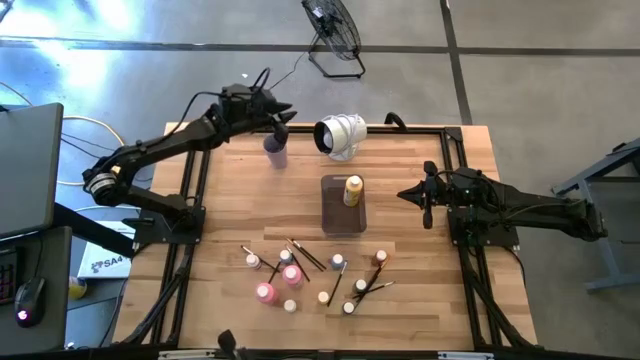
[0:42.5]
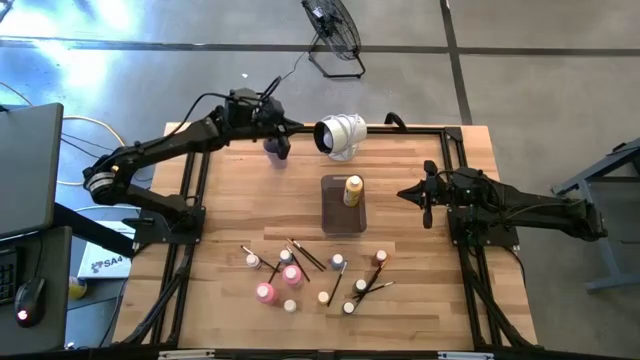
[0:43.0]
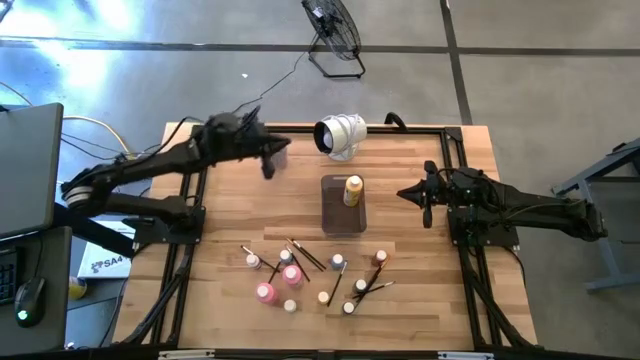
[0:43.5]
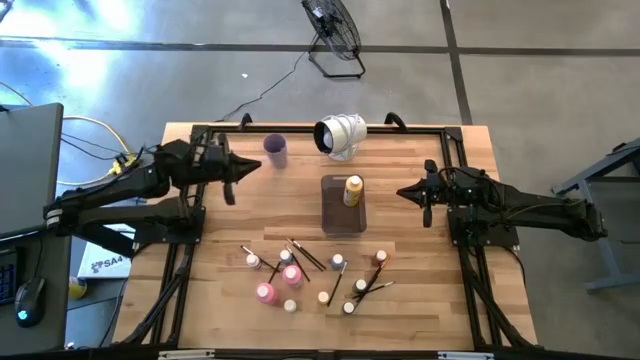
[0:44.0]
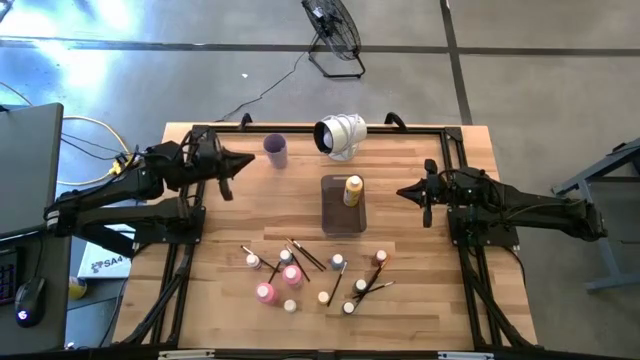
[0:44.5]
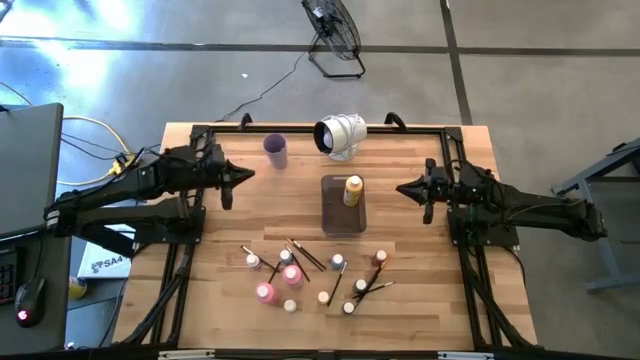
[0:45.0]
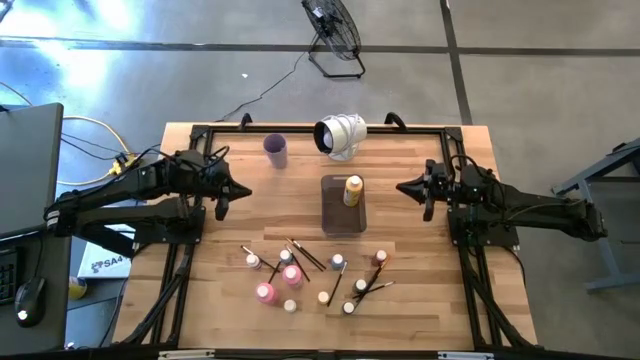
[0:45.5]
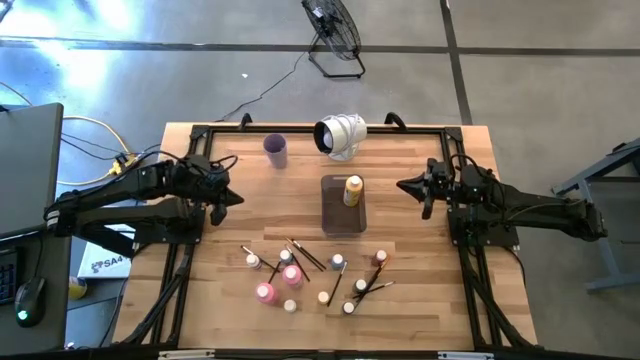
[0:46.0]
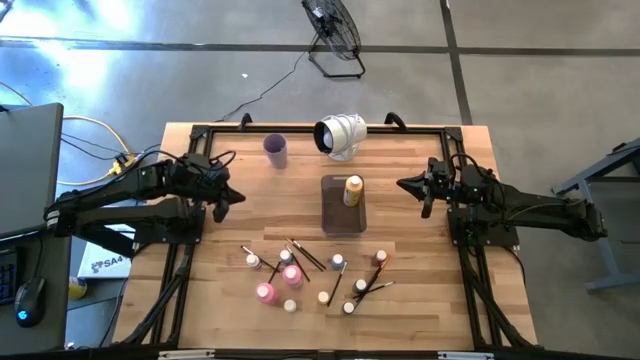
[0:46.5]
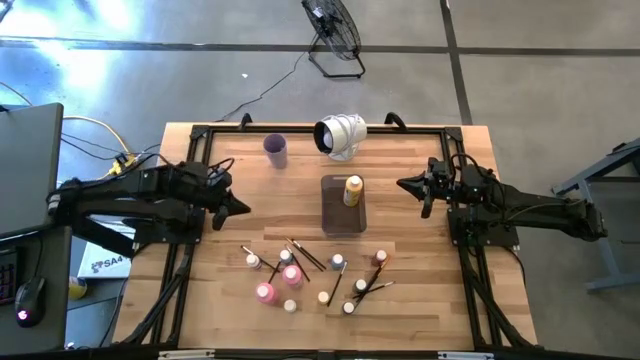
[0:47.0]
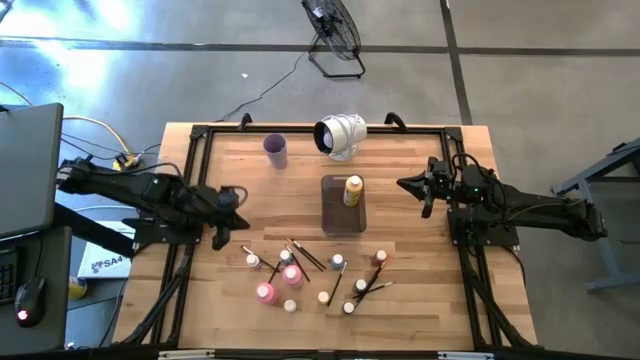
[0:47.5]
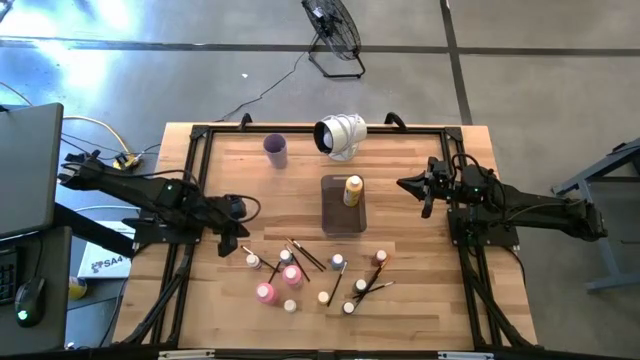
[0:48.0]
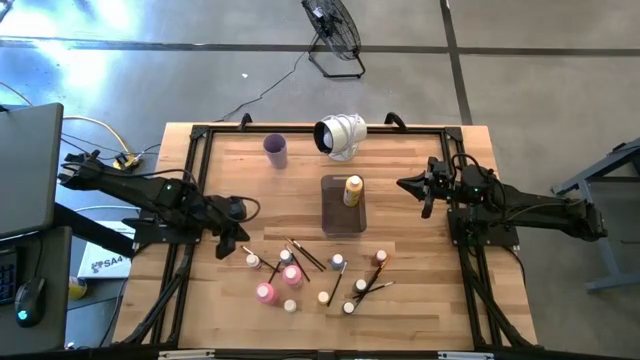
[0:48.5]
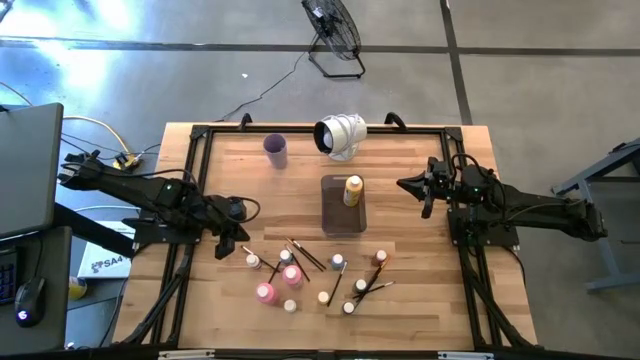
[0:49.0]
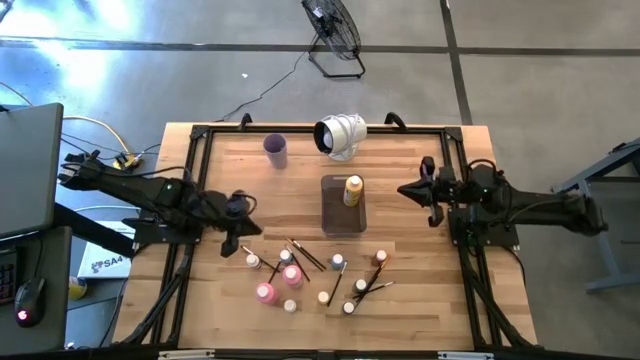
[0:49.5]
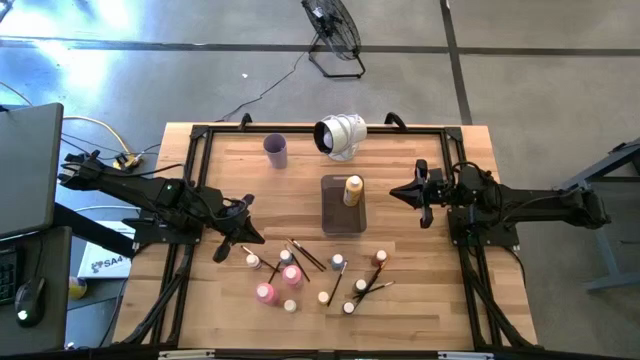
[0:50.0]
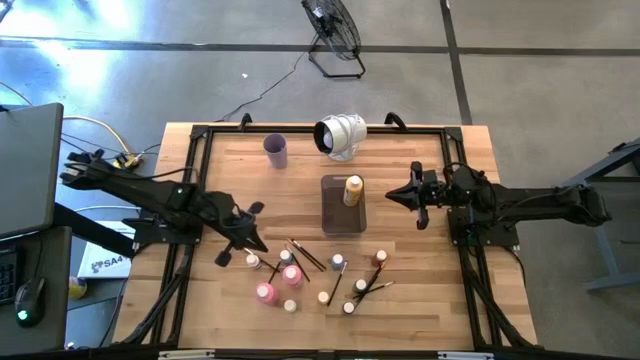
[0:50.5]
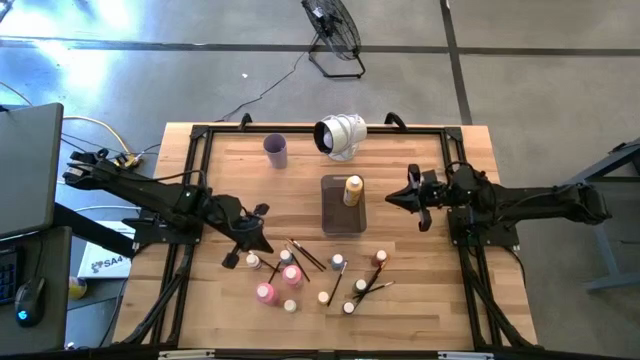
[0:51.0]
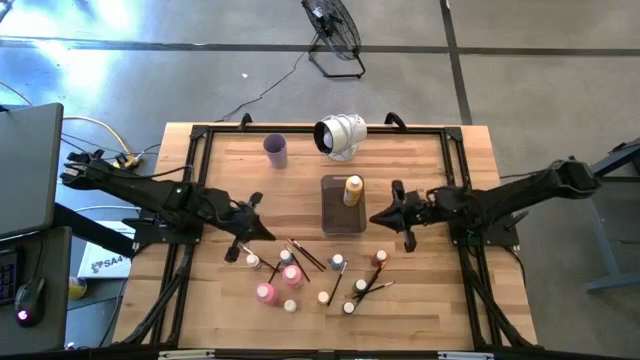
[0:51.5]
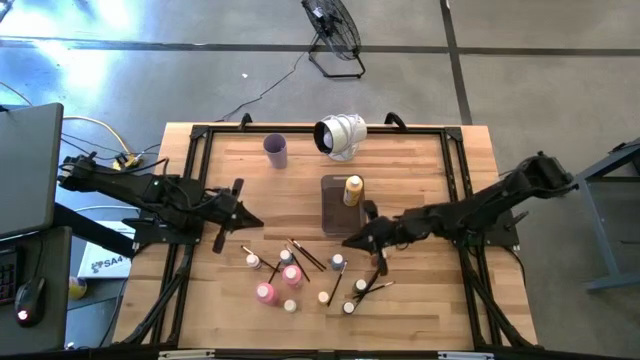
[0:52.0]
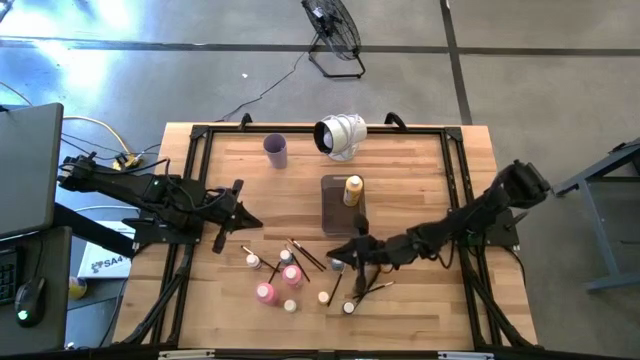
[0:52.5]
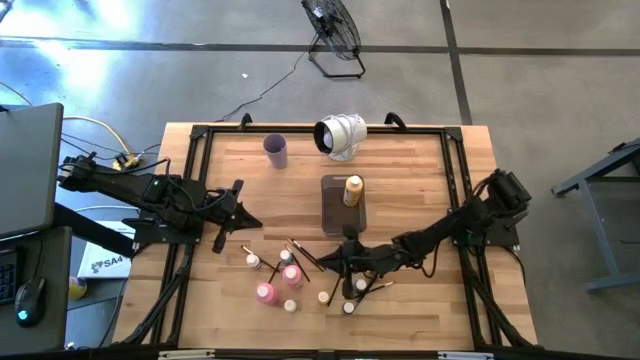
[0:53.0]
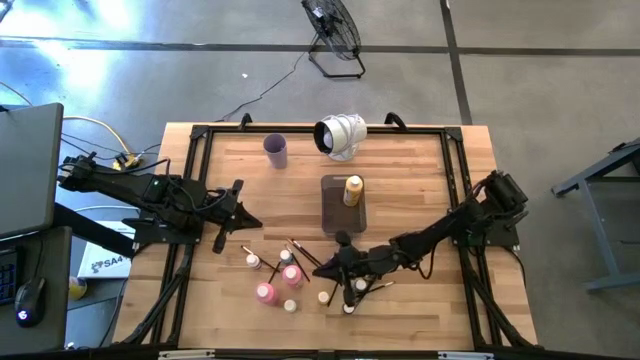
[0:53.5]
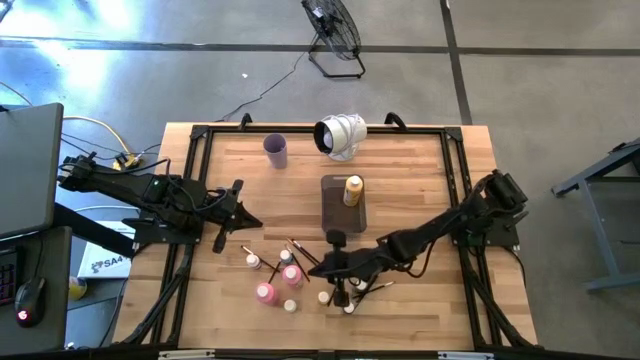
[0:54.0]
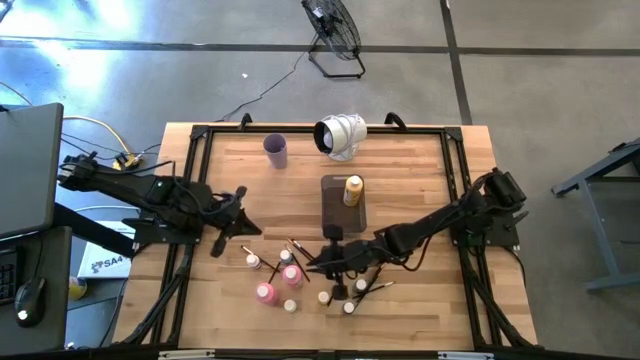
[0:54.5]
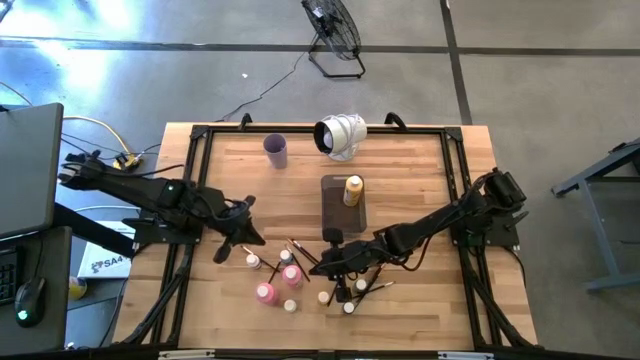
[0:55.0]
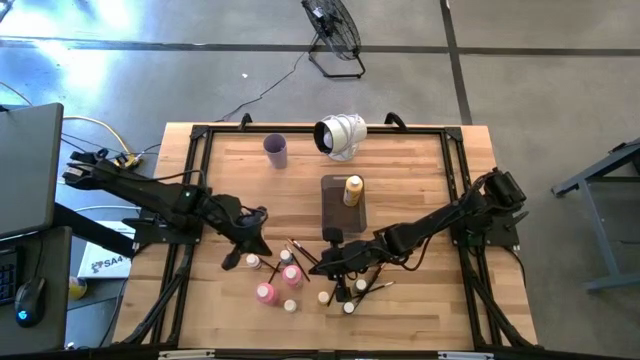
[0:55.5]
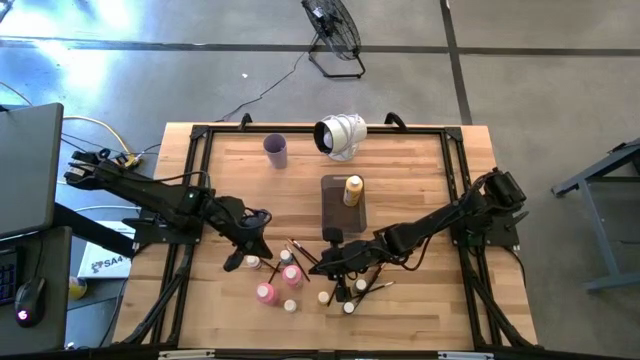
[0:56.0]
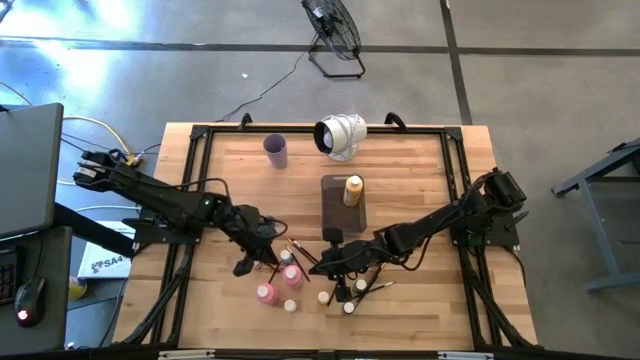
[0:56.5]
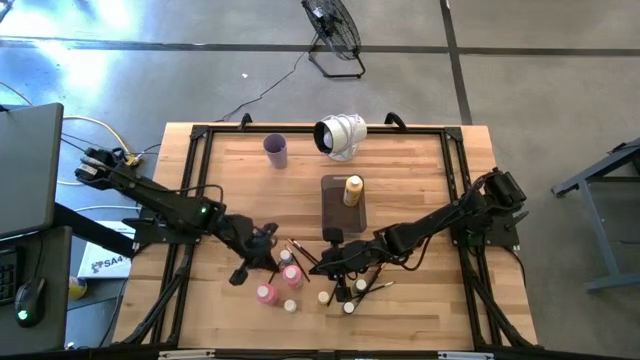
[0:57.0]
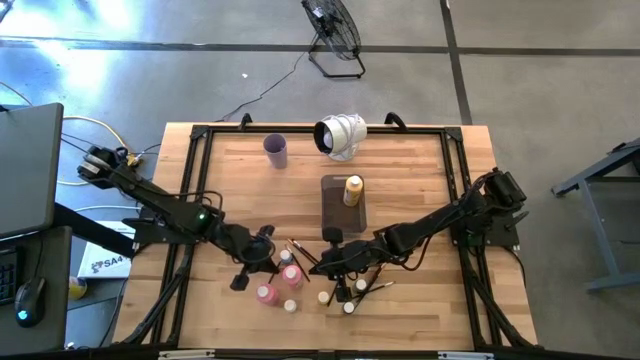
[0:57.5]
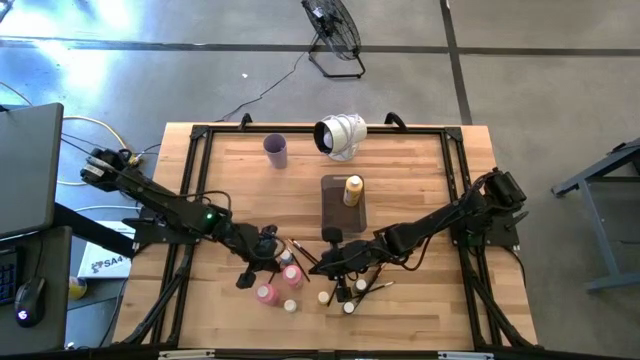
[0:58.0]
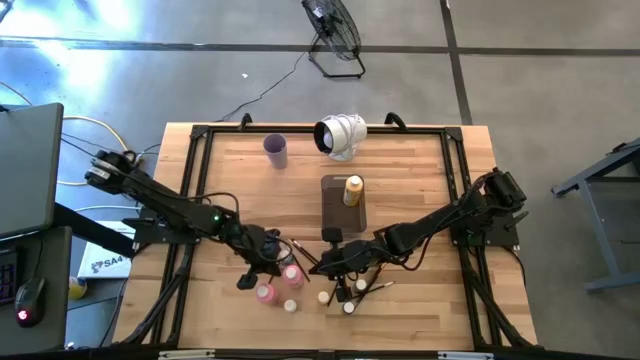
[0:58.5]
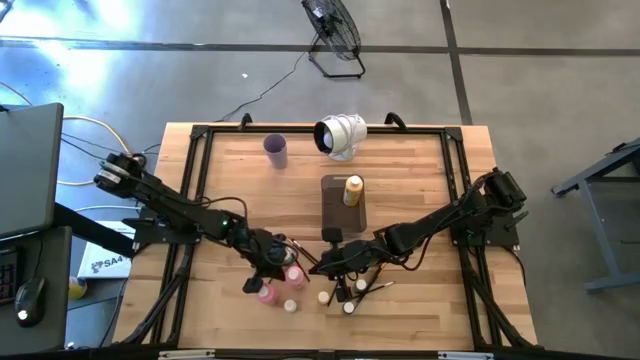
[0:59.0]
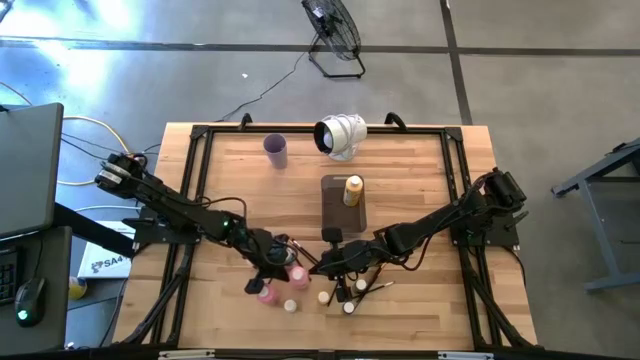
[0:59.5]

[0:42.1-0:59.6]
Task: Pick & Place Paint Supplies
Put the top pink paint bottle into the black bin

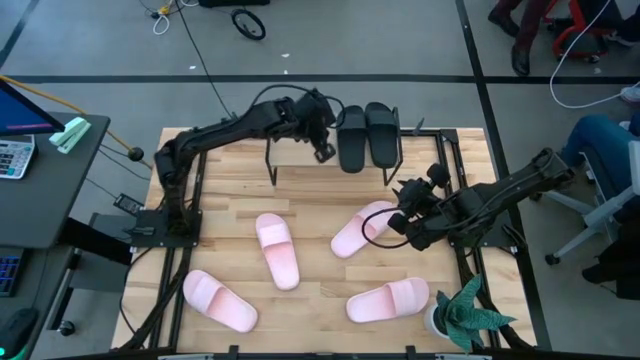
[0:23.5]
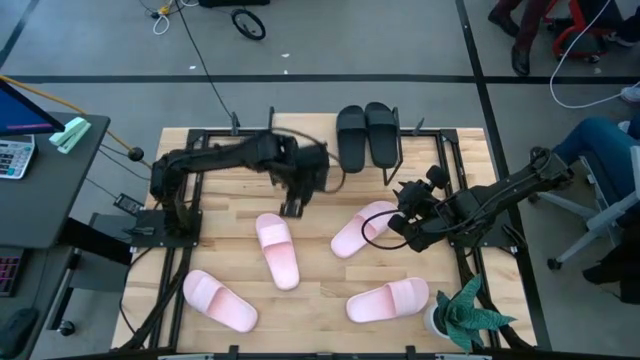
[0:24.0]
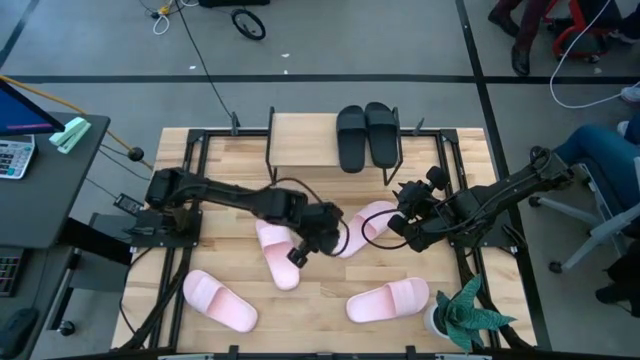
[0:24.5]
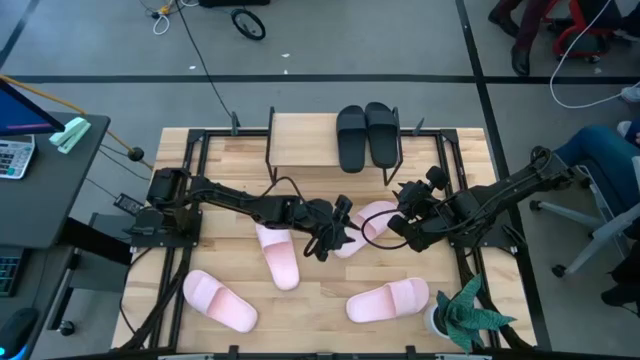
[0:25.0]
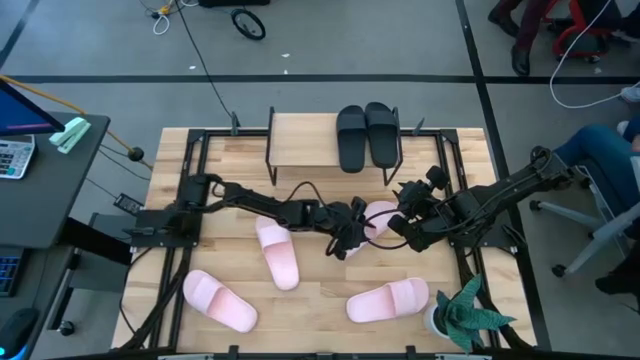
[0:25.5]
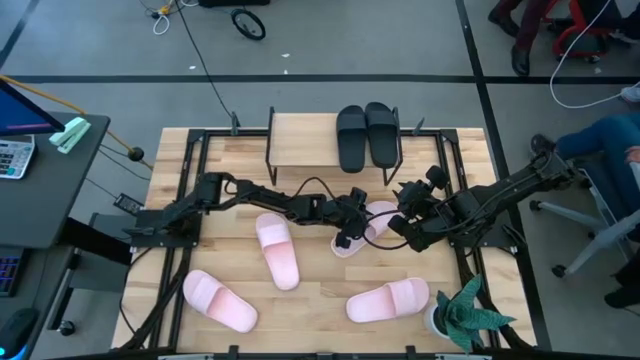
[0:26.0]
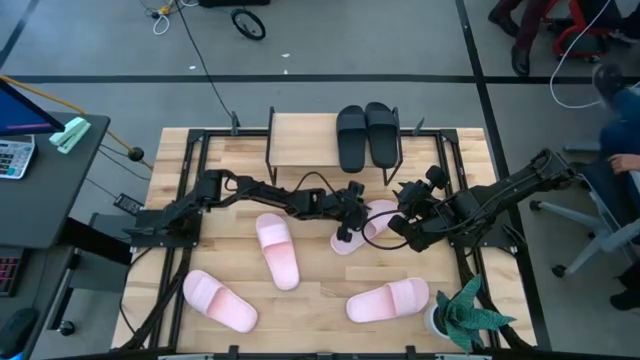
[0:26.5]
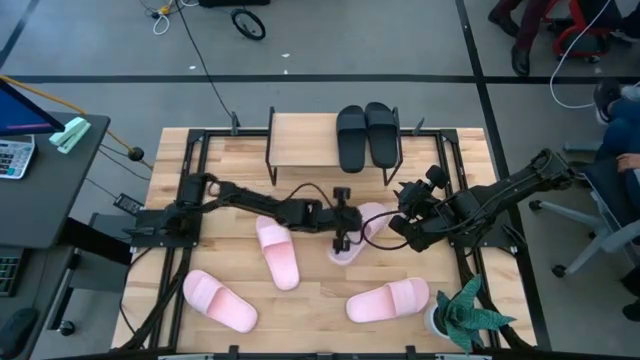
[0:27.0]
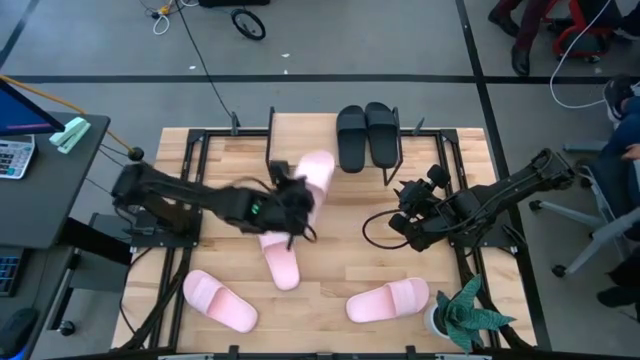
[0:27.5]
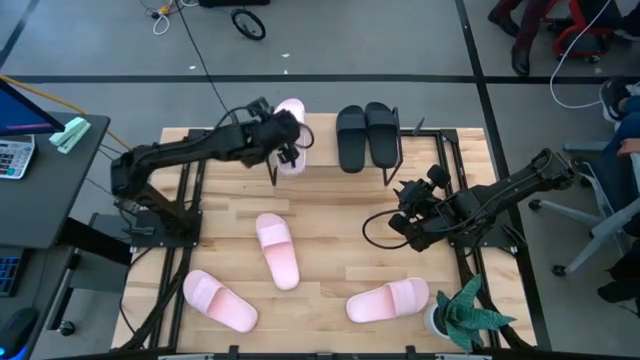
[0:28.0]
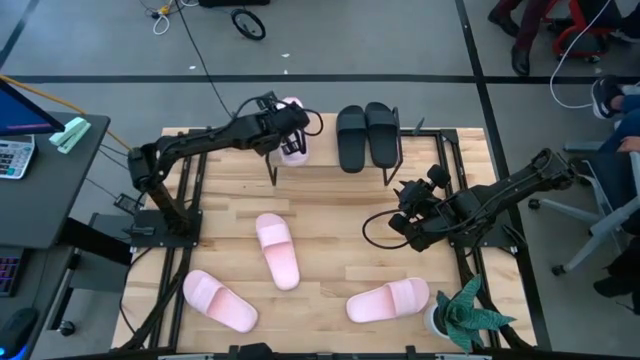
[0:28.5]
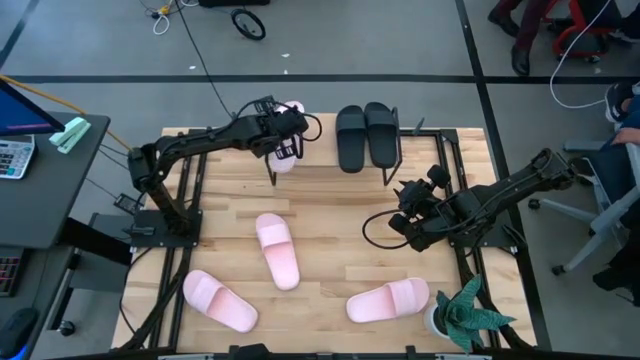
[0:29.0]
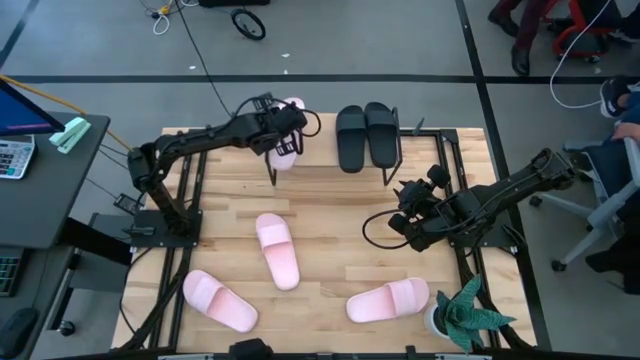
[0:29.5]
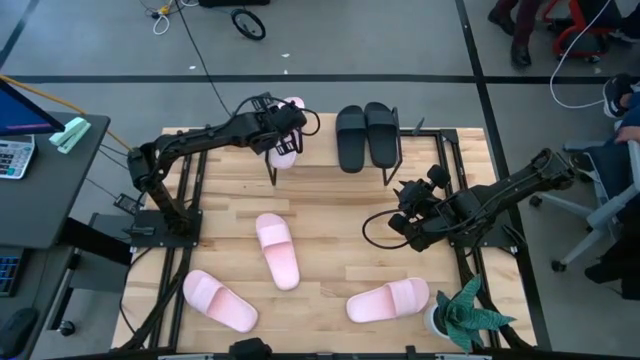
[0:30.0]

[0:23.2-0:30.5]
Task: Pick and place slides into the shelf
Put the top right pink slide on the shelf
